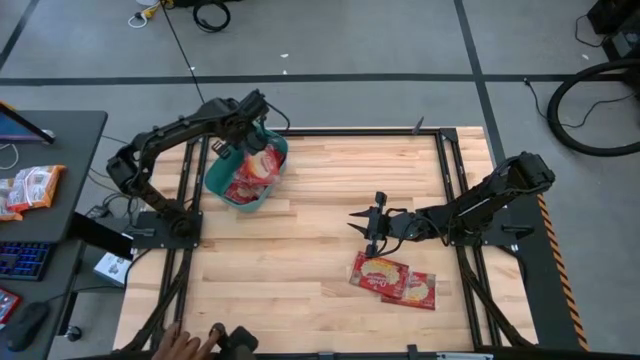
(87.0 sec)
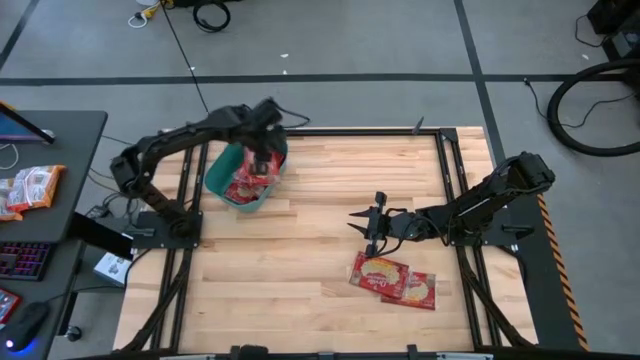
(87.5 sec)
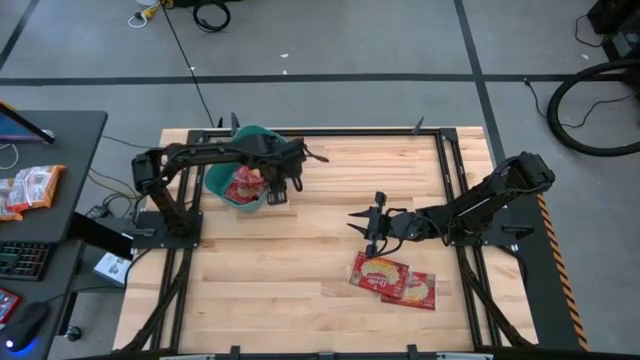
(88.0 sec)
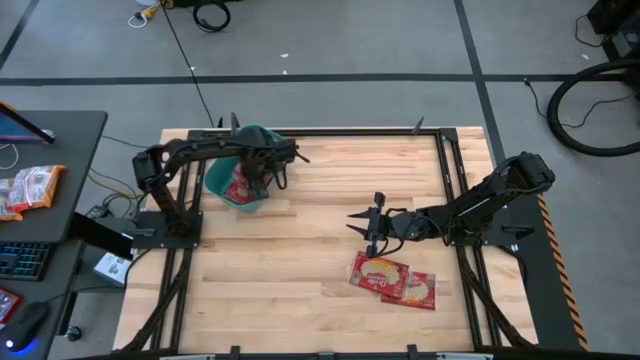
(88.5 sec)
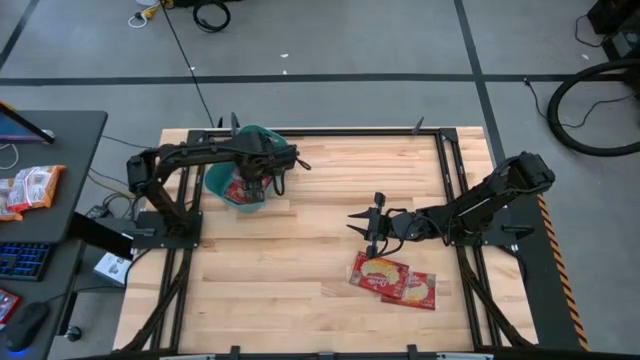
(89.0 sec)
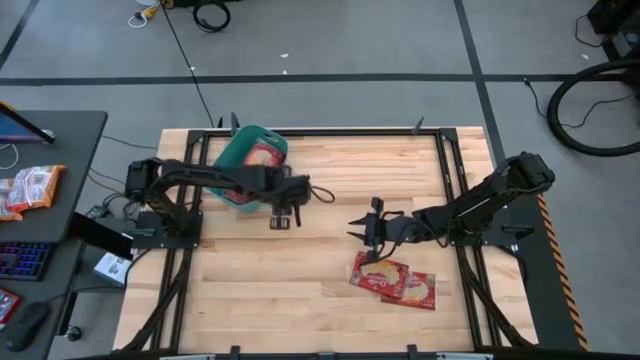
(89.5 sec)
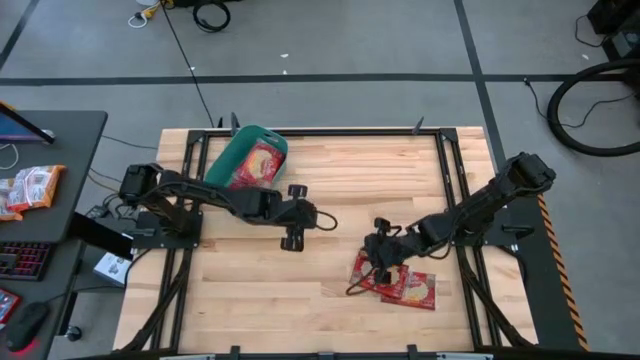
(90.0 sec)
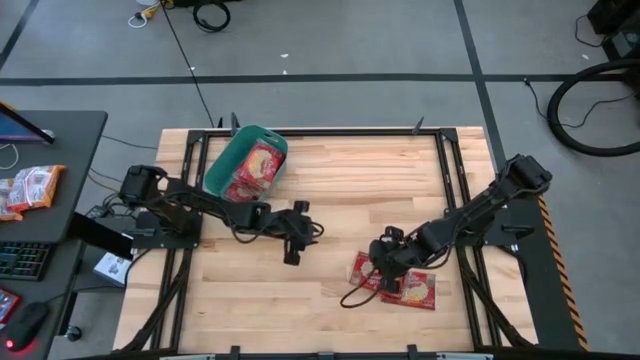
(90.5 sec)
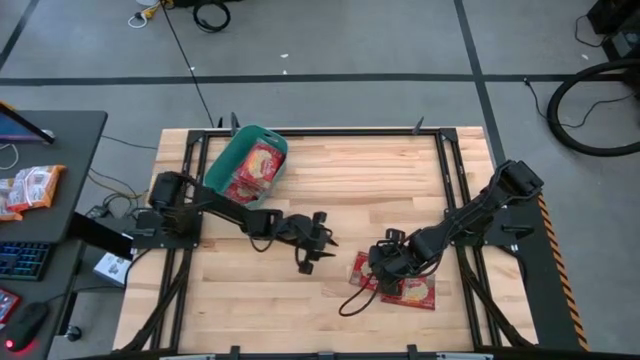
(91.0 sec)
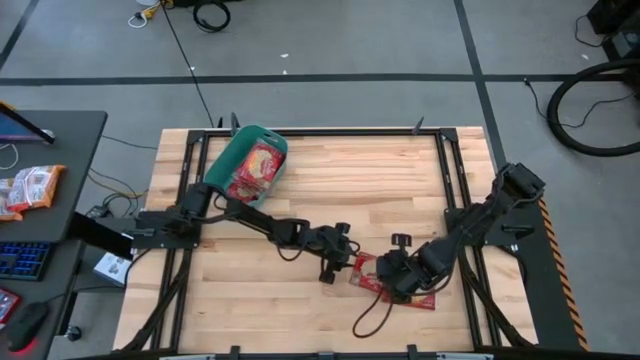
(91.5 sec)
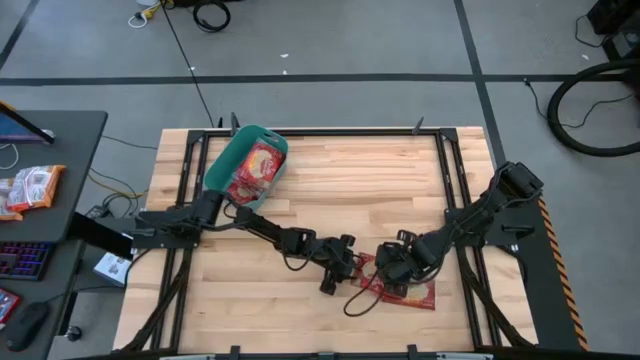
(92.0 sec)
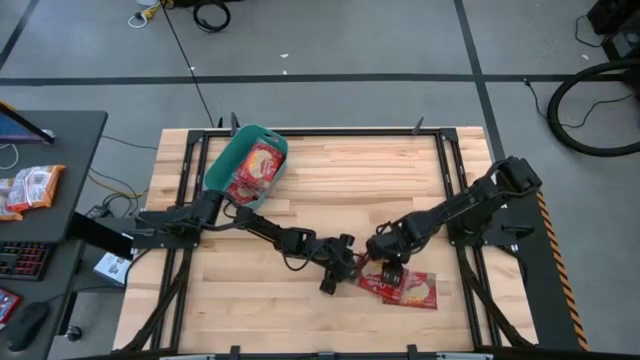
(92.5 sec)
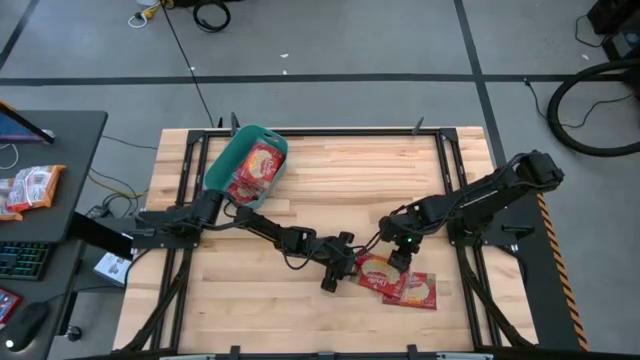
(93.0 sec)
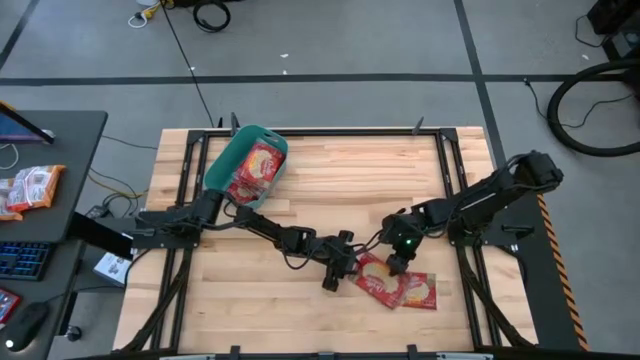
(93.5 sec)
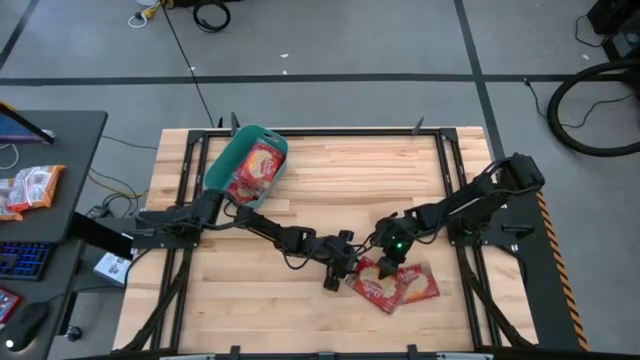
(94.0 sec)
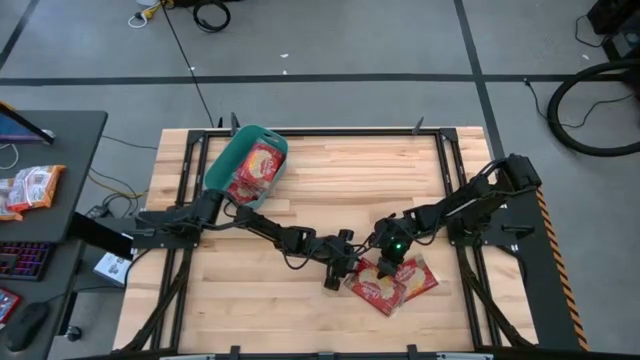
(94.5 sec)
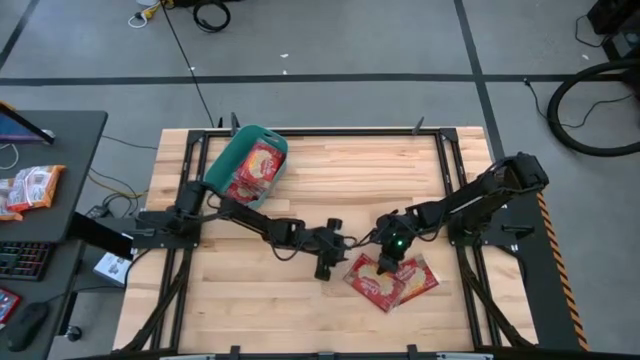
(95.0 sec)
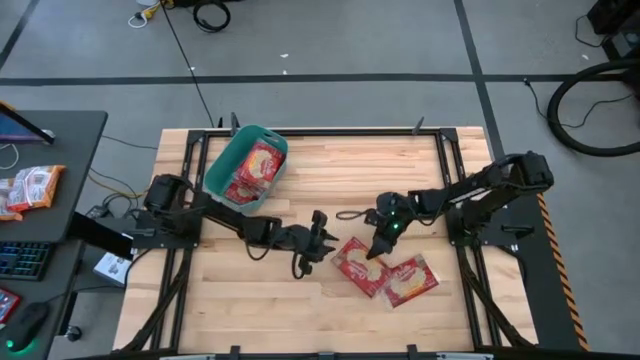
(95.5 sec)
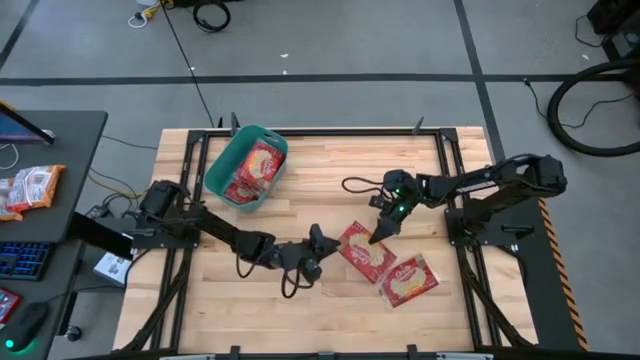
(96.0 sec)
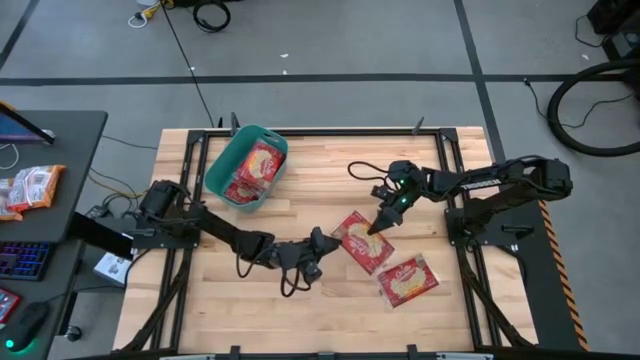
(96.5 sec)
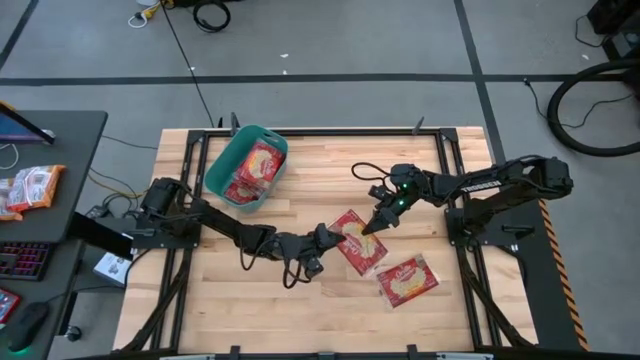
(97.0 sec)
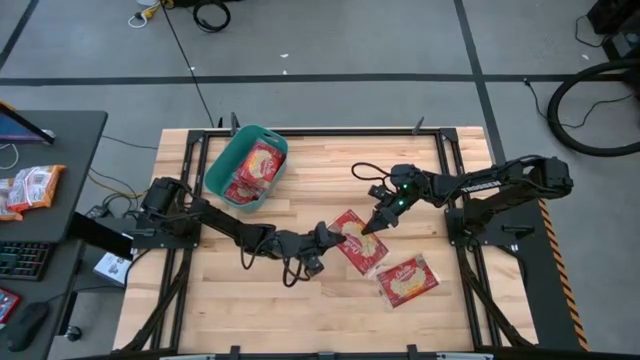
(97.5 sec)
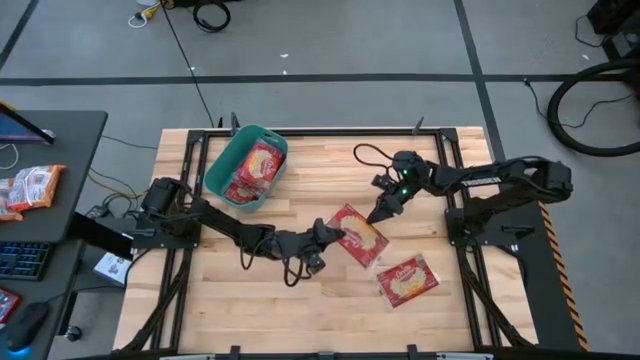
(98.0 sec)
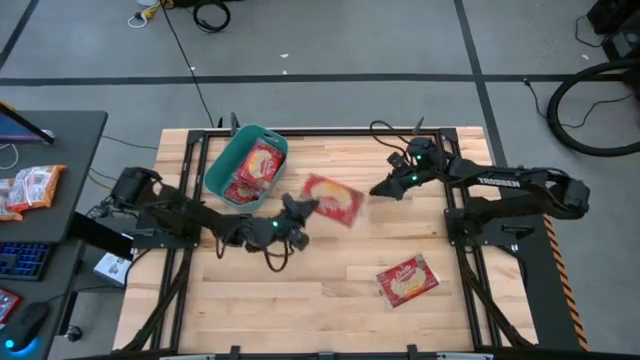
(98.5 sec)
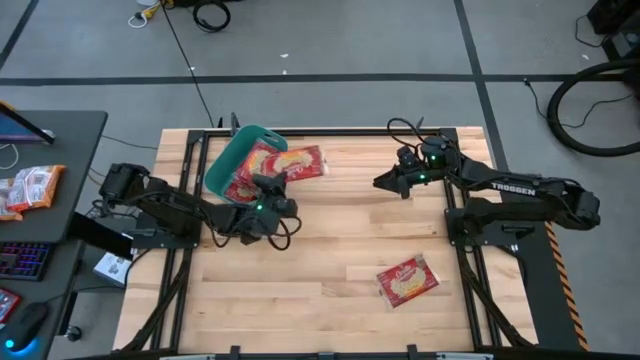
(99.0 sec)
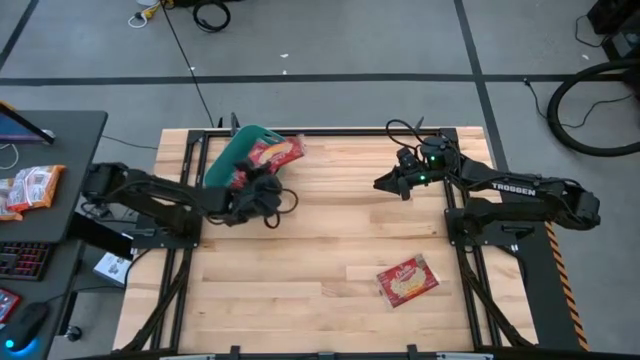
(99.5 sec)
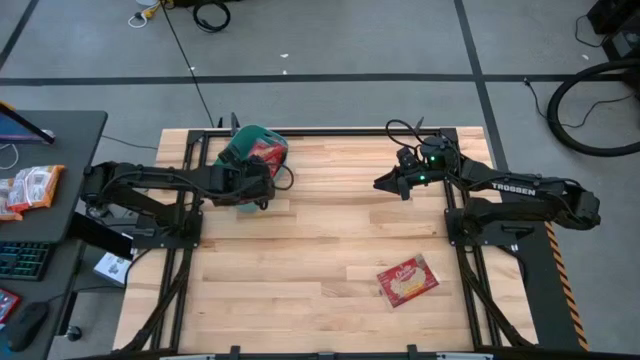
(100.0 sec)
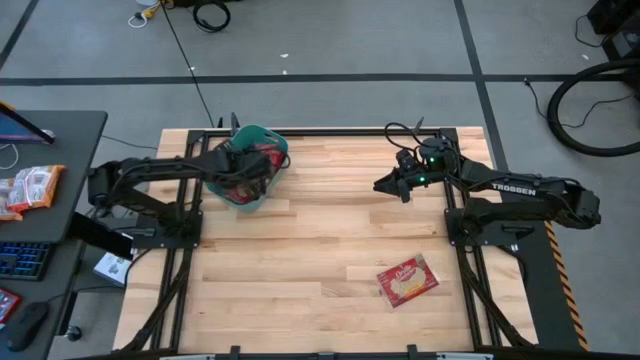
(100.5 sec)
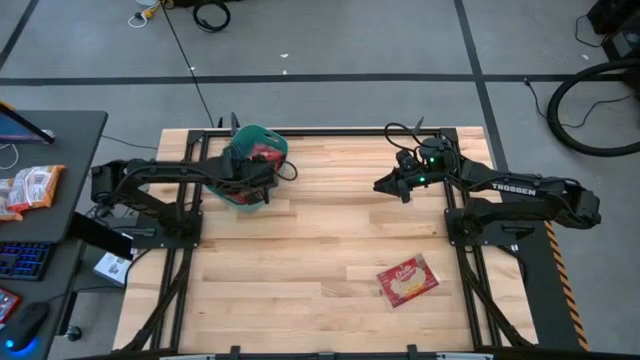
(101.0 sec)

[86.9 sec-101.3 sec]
Task: Sort popcorn bags into baskets
Put the red popcorn bag into the green bin

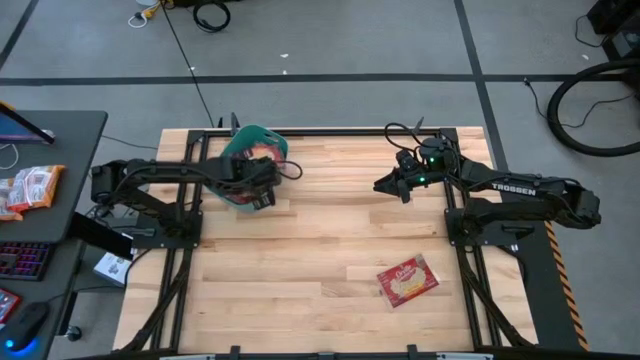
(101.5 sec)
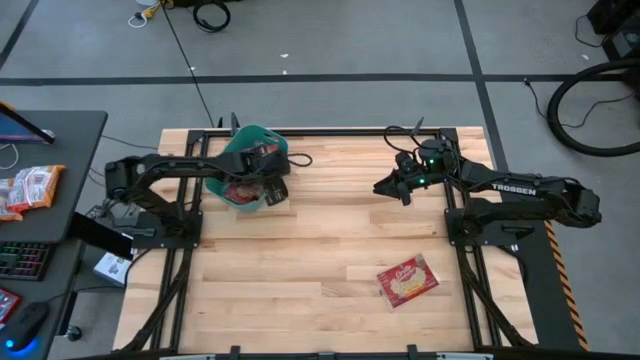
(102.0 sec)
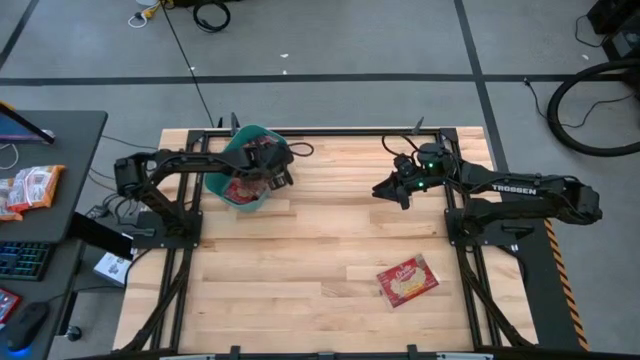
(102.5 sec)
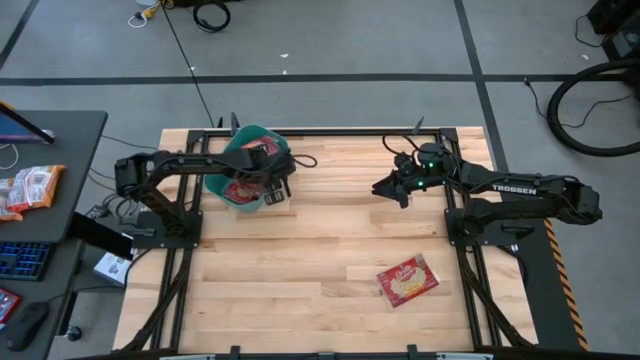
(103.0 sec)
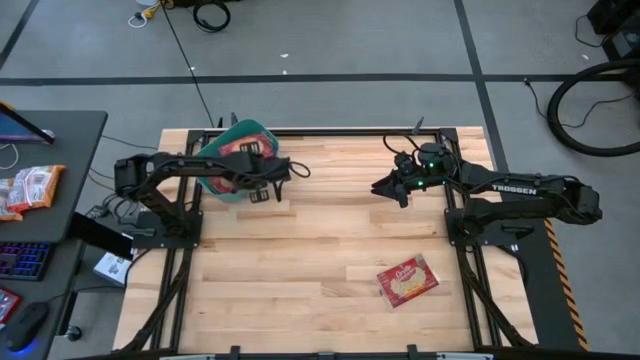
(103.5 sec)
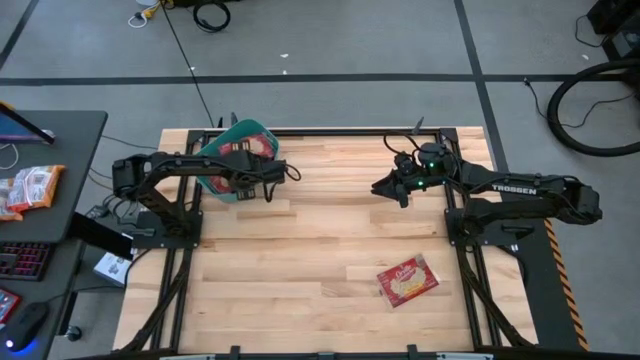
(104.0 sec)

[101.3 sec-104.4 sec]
Adjust the red popcorn bags in the green bin

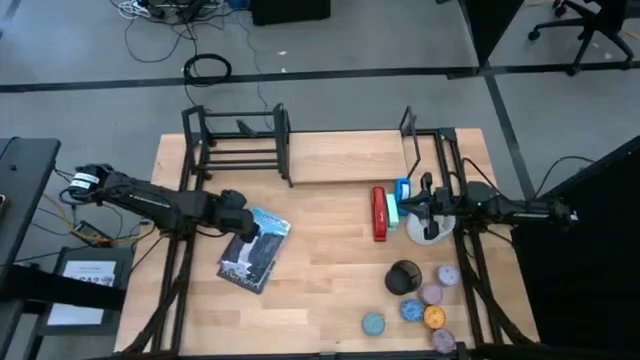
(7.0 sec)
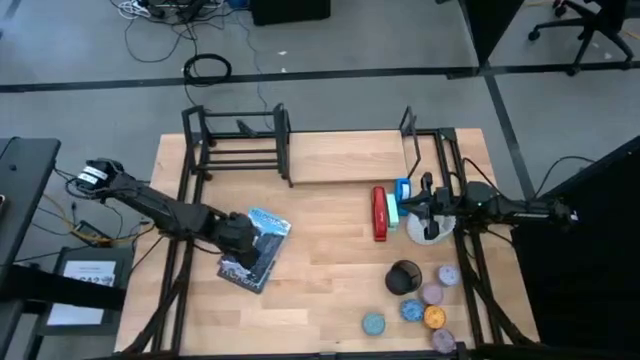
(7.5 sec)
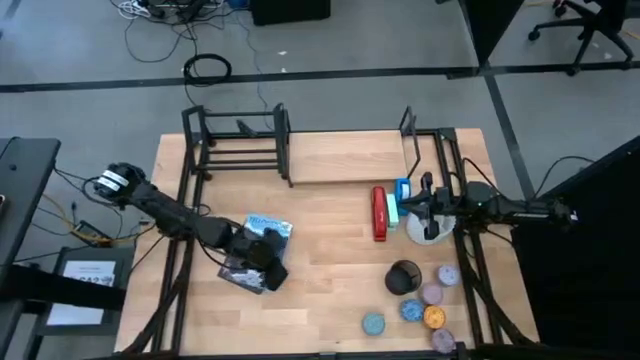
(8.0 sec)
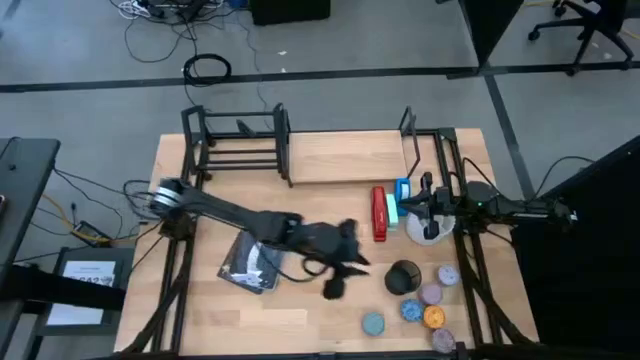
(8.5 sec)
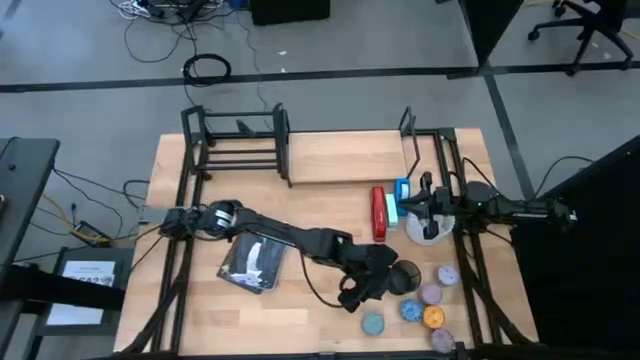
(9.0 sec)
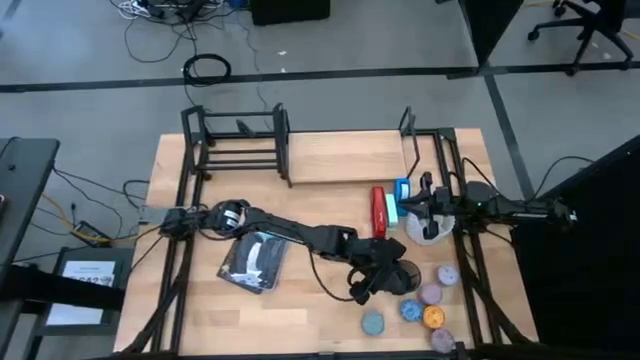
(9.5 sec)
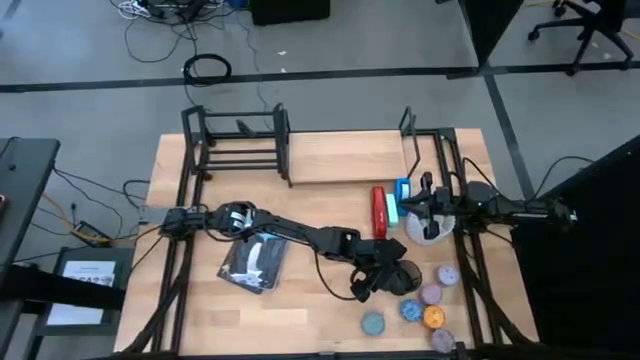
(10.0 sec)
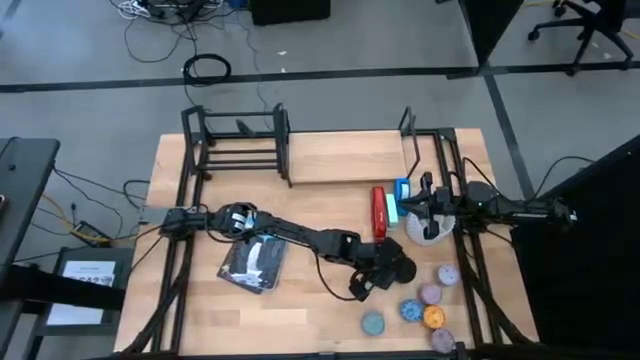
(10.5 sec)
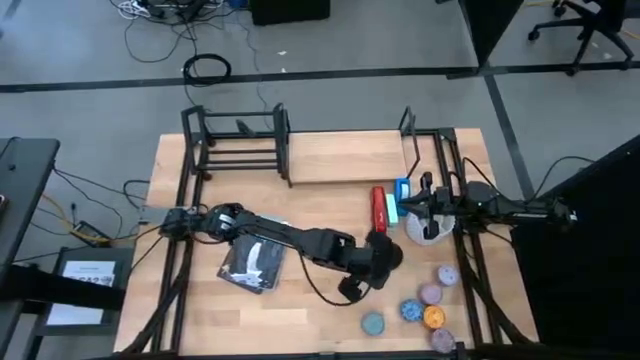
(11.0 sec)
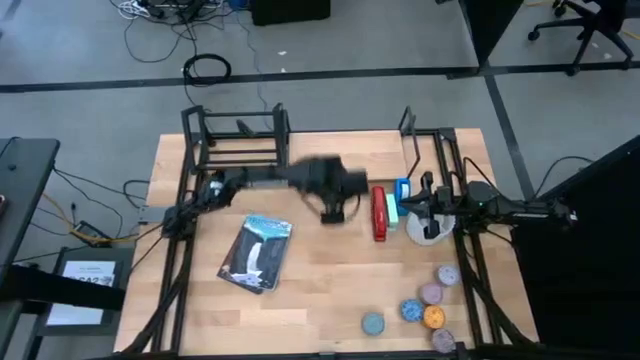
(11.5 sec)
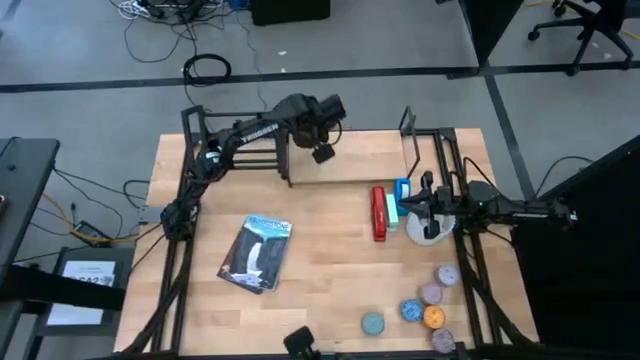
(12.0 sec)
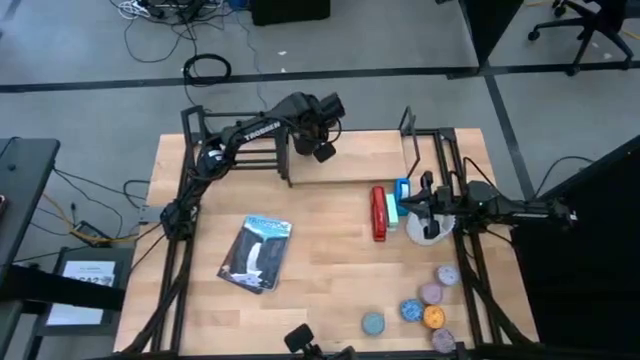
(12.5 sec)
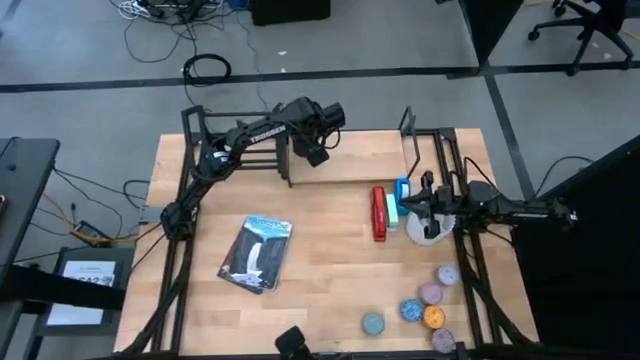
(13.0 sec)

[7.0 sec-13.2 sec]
Task: Stock shelves
Put the black pen organizer on the shelf
